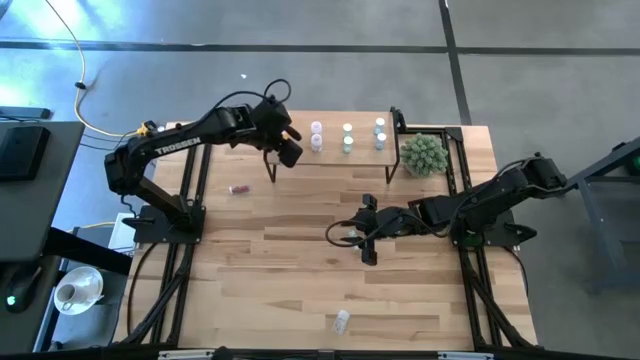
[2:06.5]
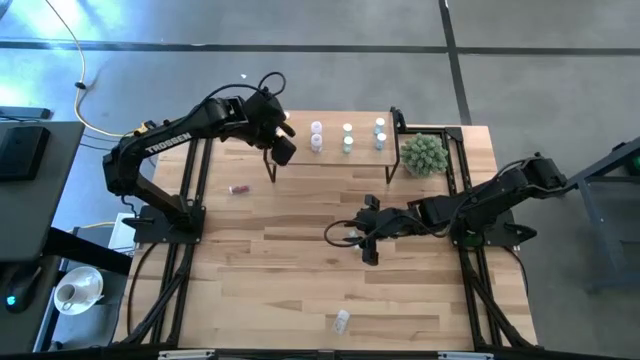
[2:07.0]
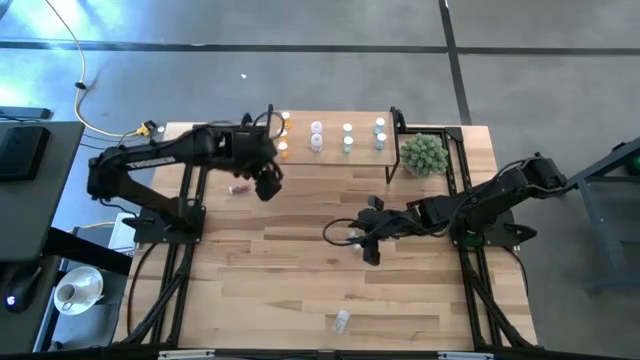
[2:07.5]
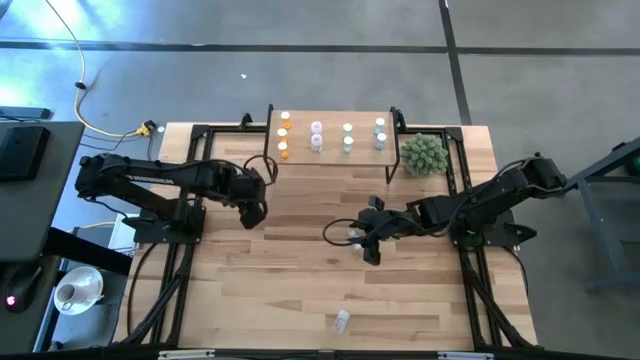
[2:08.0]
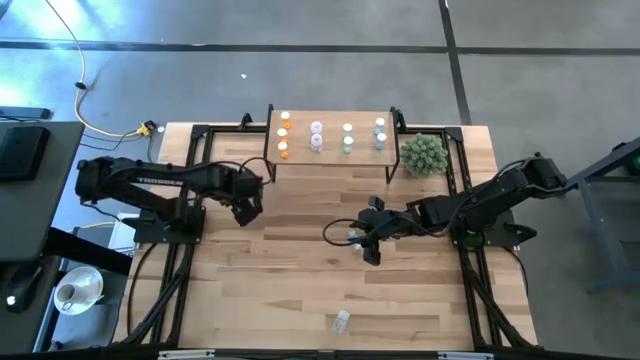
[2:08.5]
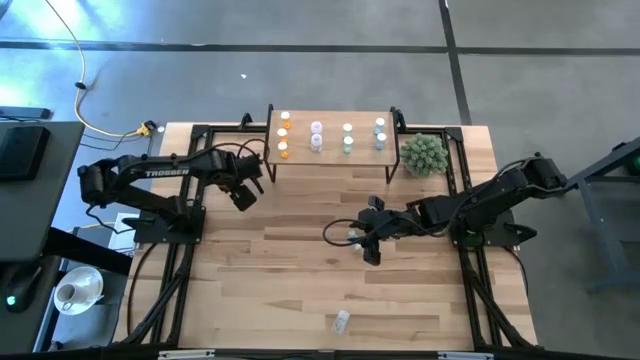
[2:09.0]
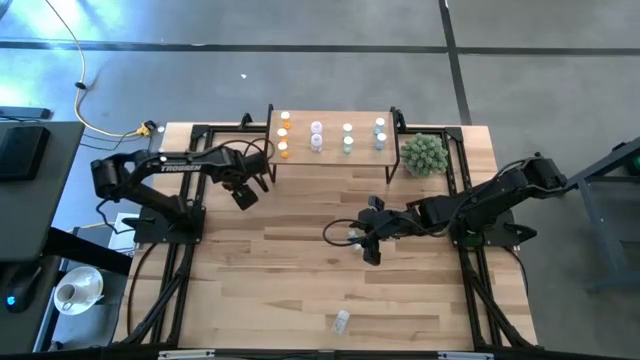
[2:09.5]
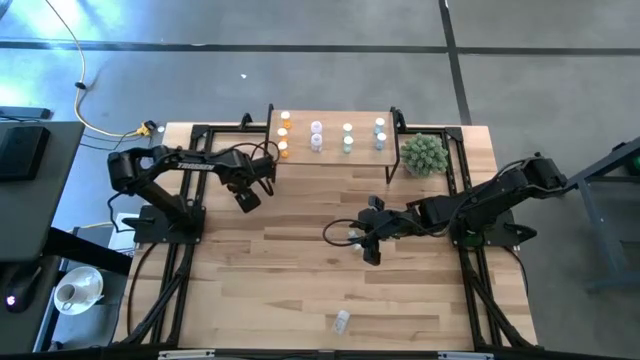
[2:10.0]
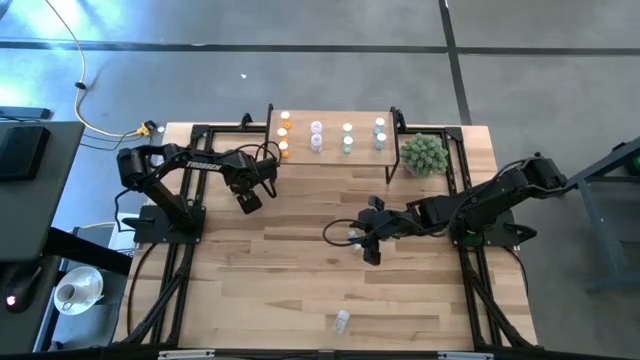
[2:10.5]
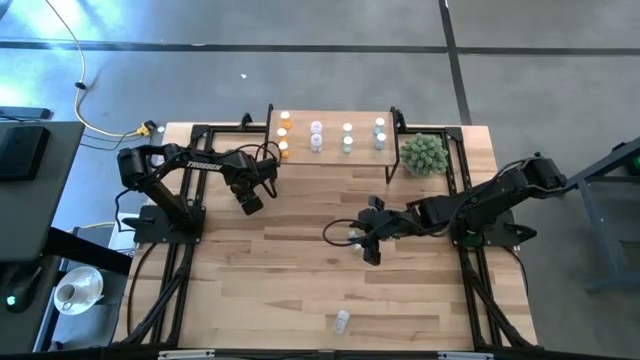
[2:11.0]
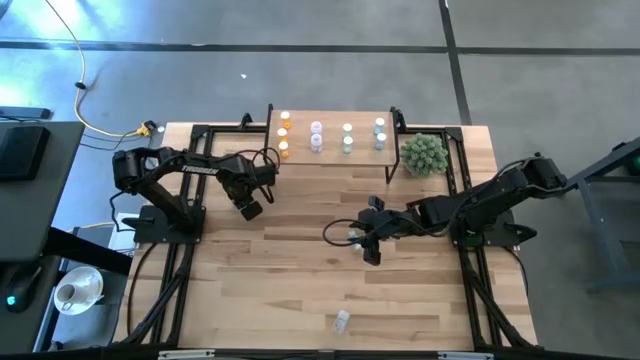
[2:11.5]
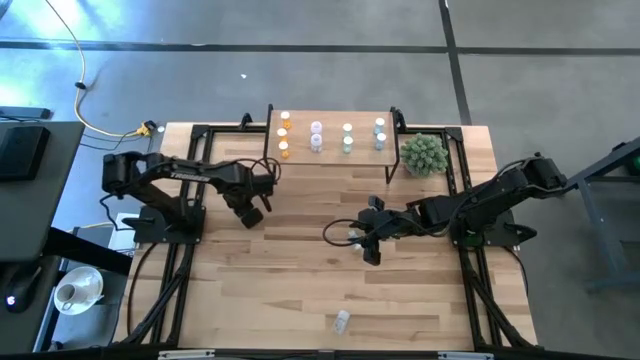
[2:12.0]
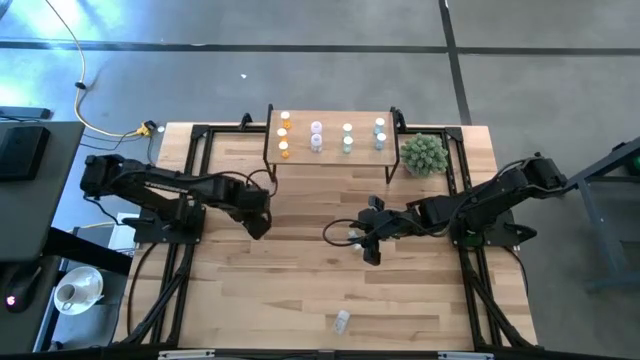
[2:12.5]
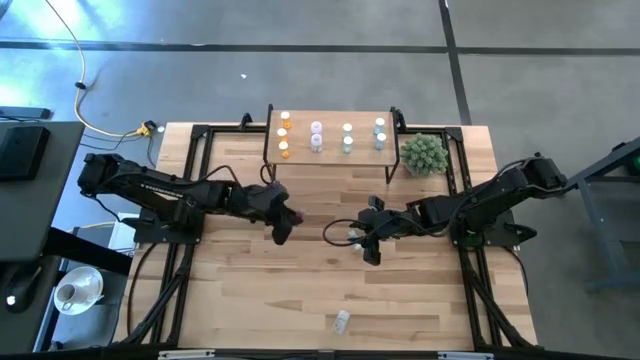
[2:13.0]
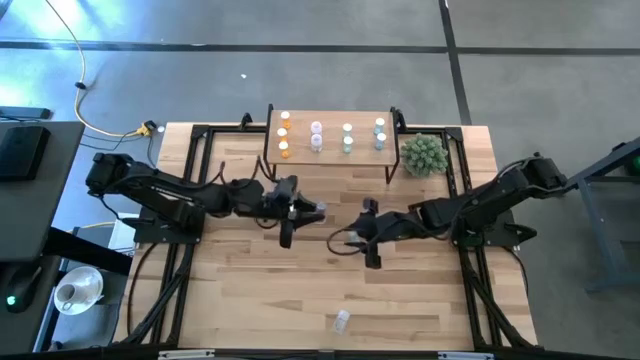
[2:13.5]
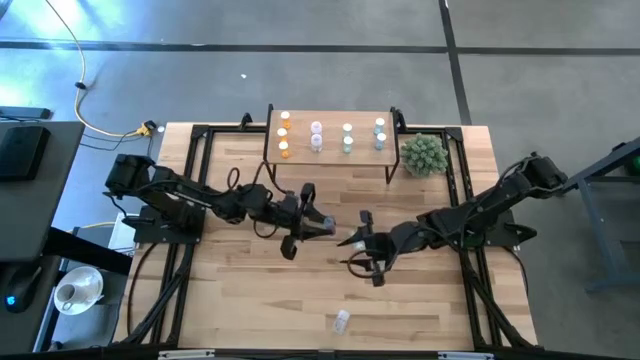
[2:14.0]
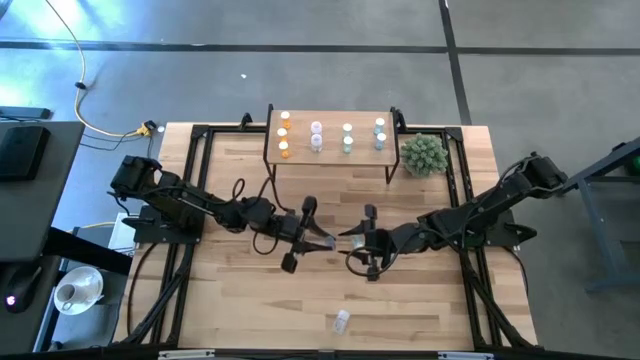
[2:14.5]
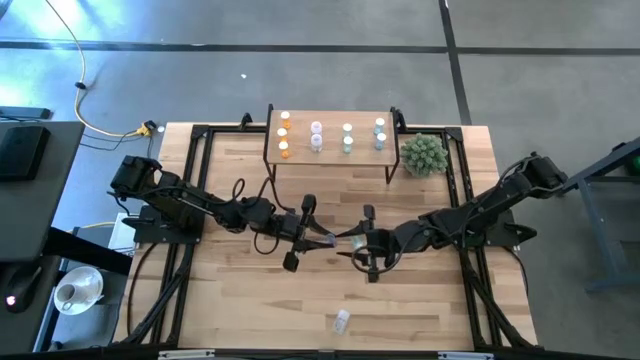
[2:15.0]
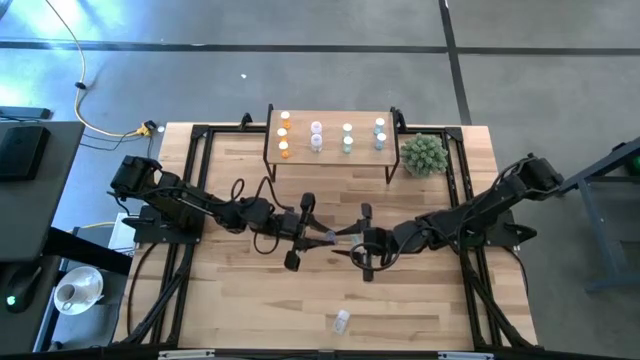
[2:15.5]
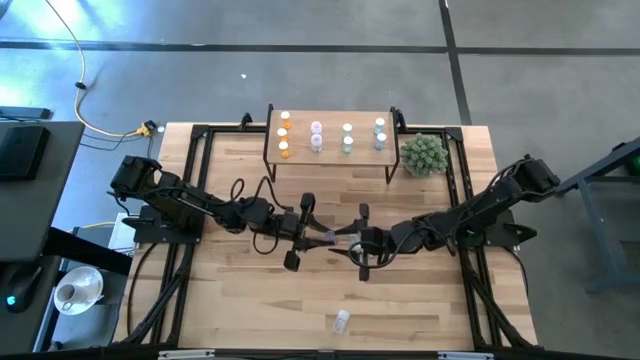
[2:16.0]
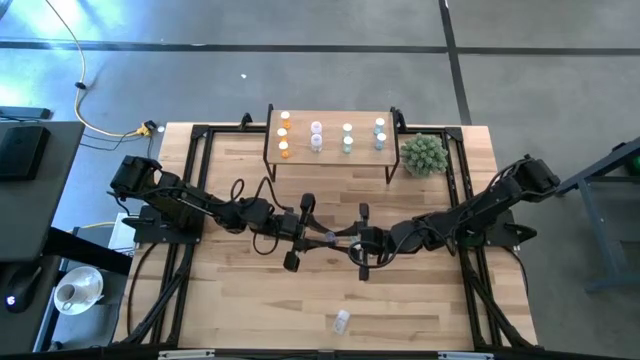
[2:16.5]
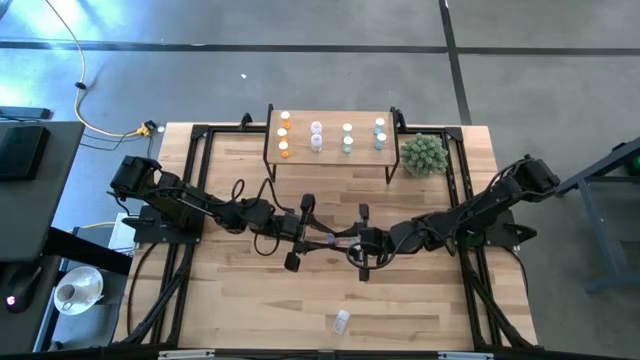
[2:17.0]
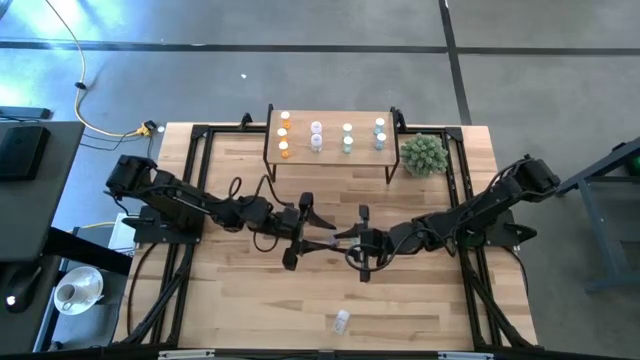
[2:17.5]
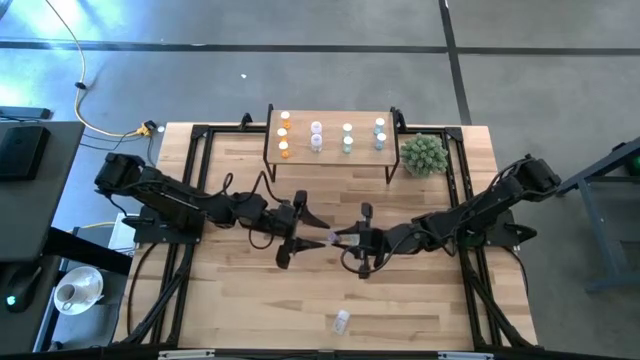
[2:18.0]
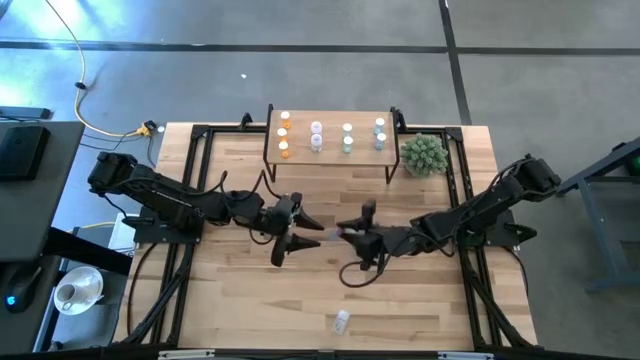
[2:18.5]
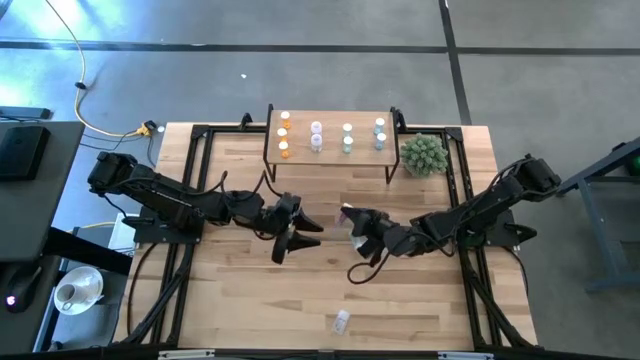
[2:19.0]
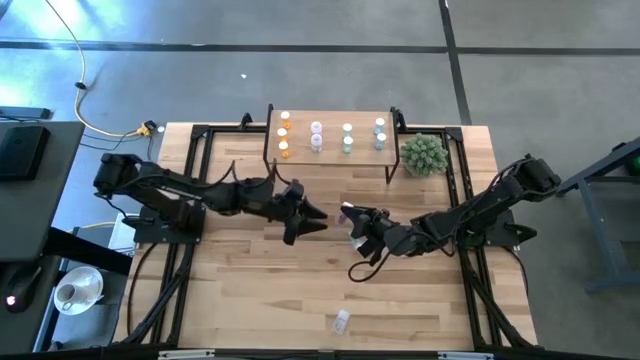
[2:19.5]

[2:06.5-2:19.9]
Task: Pick and place medicine bottles onto shelf by color
Put the blue pill bottle on the shelf and aligned with the other blue pill bottles

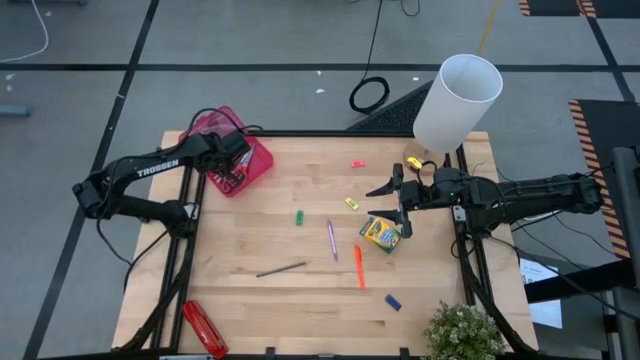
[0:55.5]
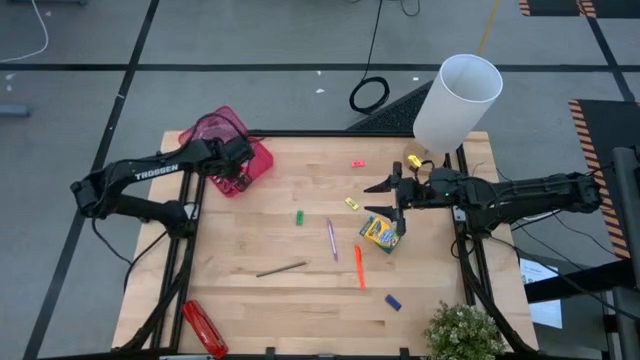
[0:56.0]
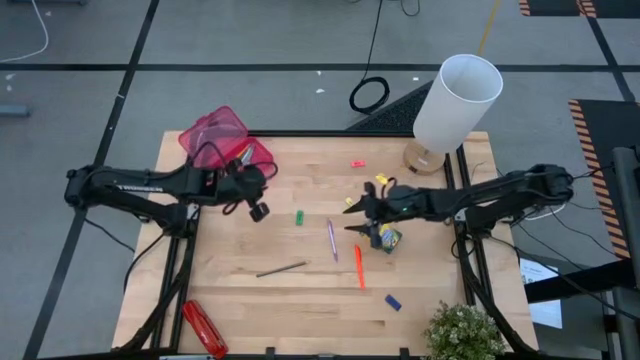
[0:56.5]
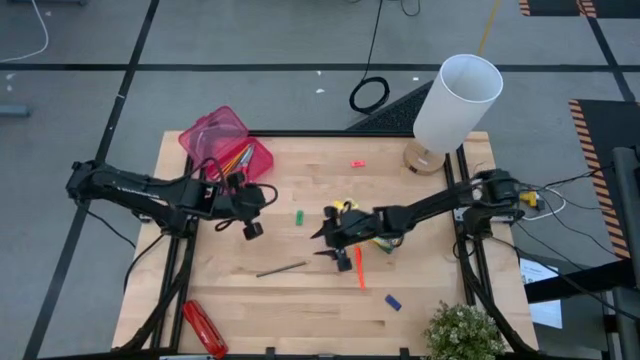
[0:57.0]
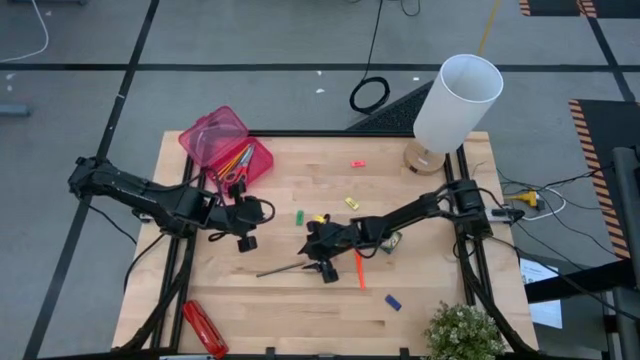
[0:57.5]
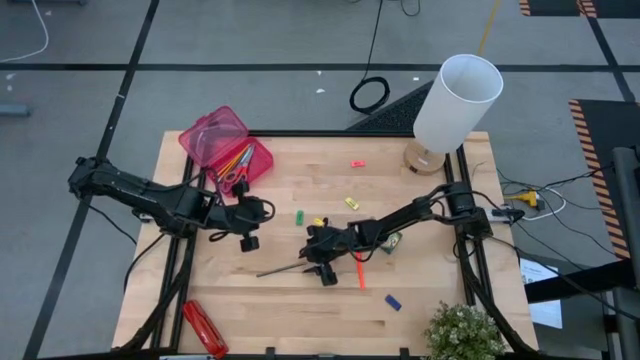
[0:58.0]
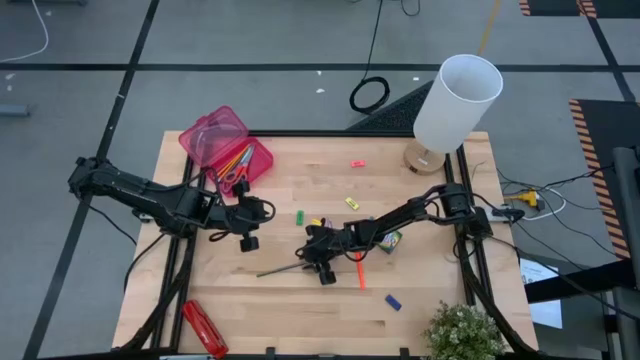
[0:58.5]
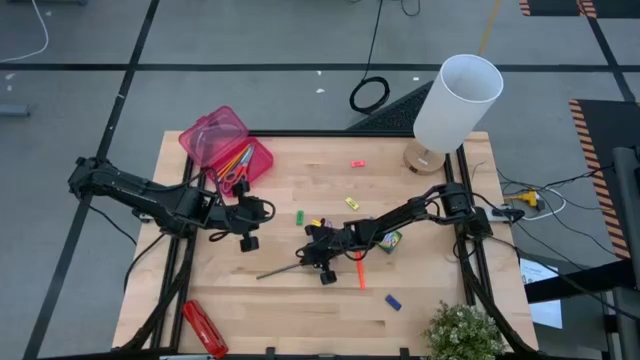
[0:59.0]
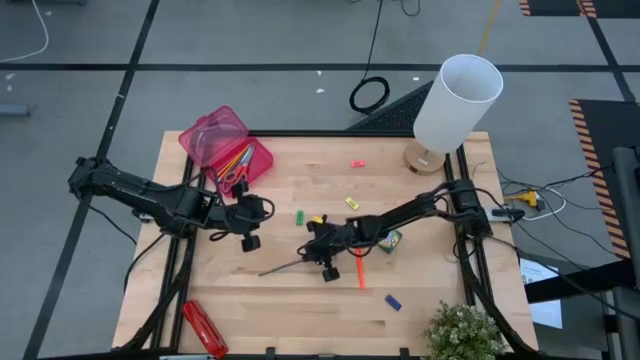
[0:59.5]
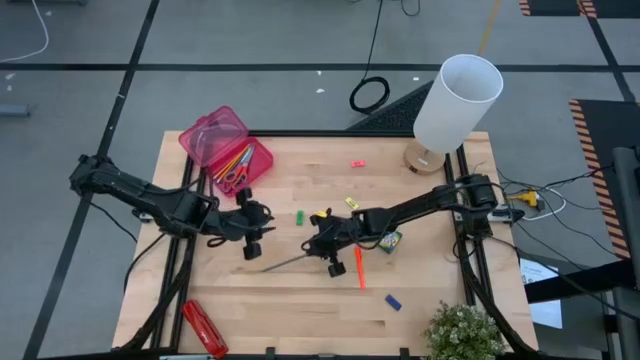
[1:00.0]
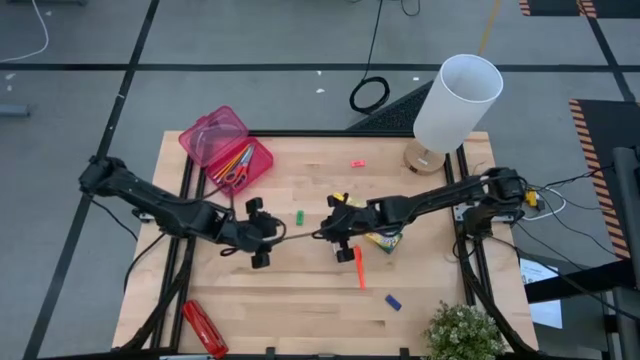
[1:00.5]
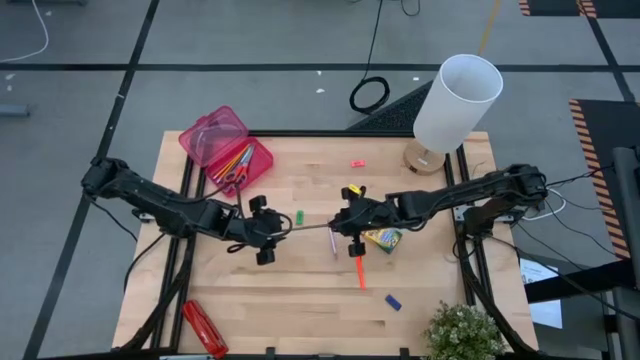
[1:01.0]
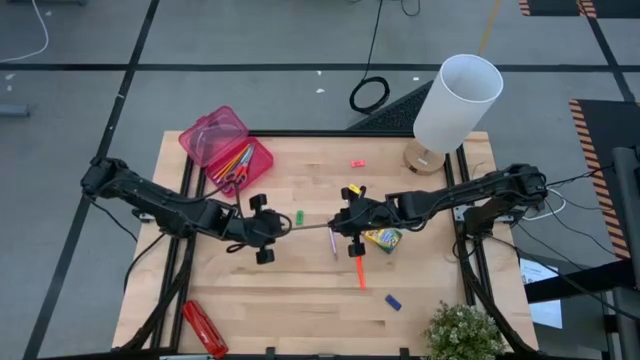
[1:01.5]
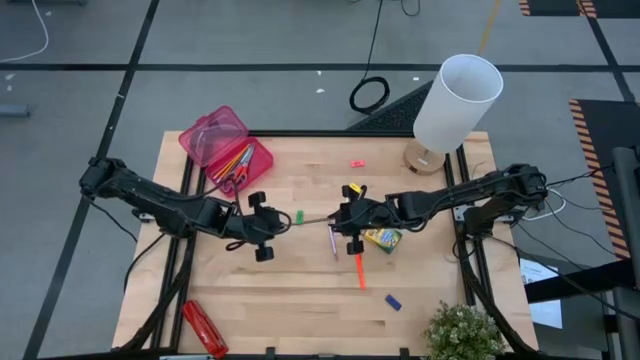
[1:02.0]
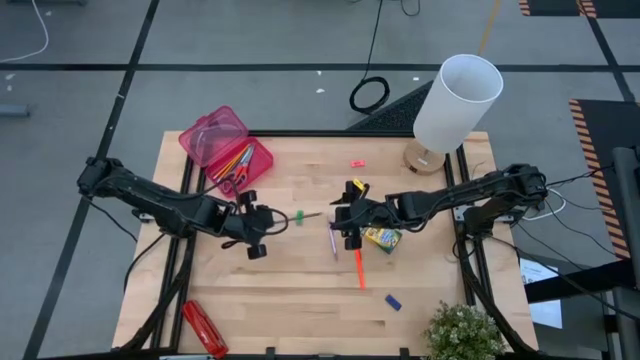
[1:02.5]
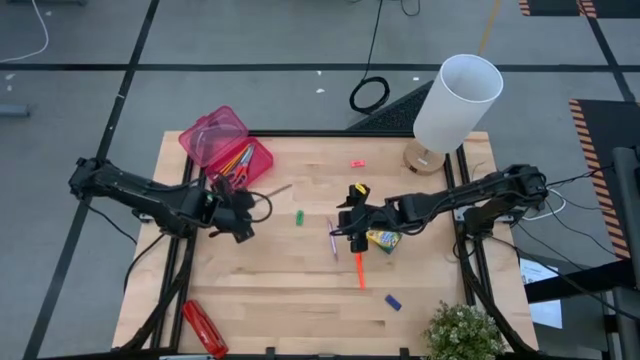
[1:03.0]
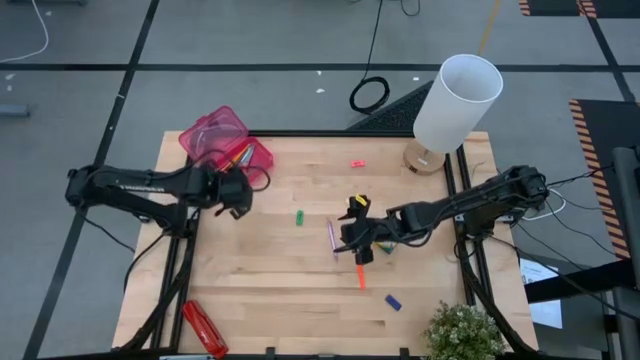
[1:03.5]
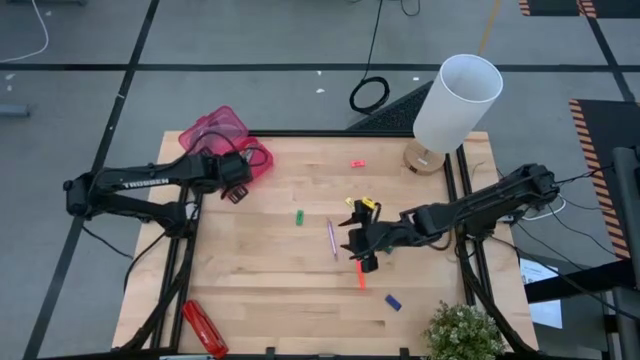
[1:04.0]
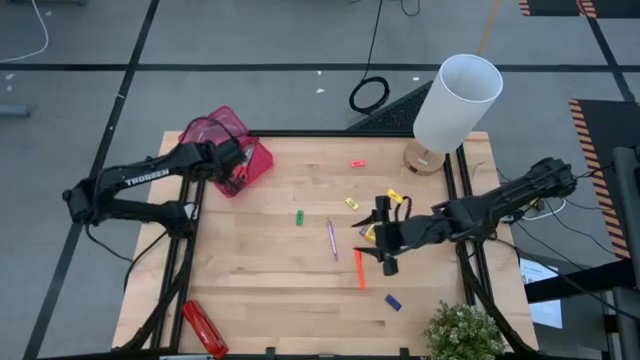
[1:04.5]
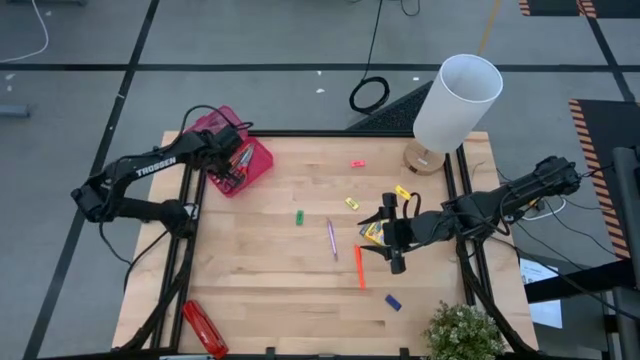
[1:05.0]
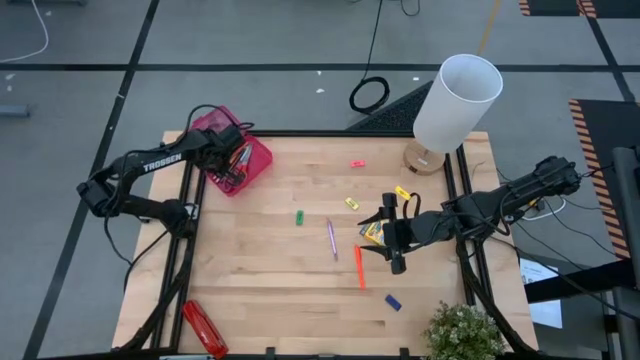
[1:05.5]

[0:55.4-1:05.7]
Task: Pack school essentials
Put the black pencil into the pink supply box
